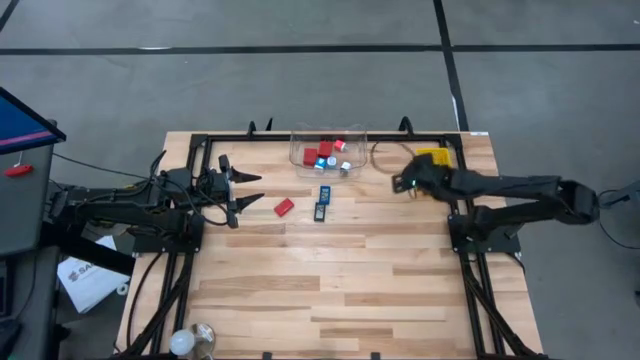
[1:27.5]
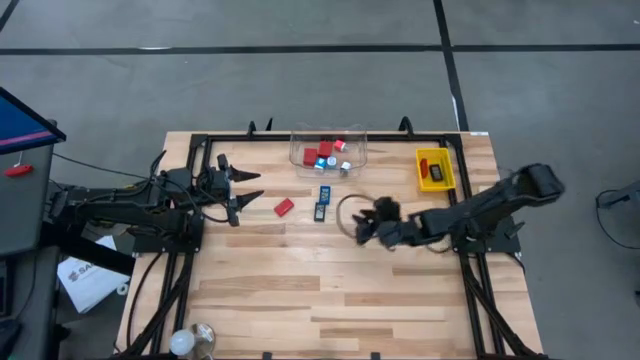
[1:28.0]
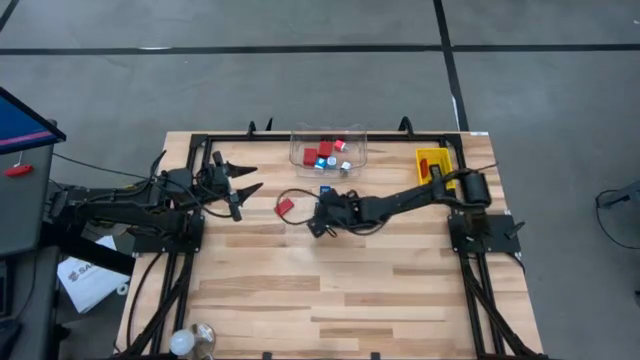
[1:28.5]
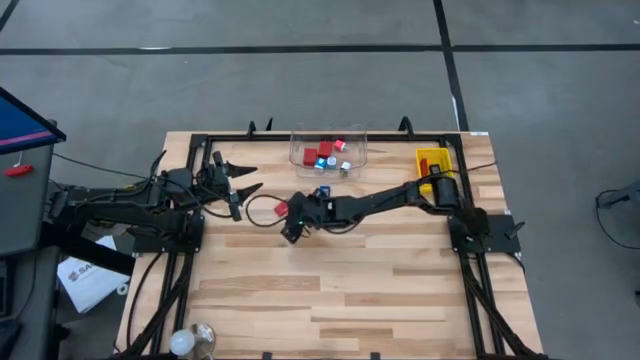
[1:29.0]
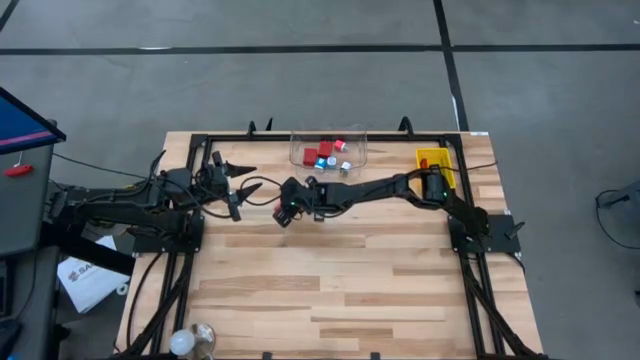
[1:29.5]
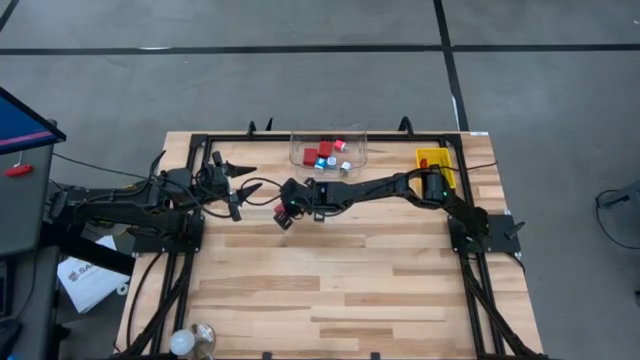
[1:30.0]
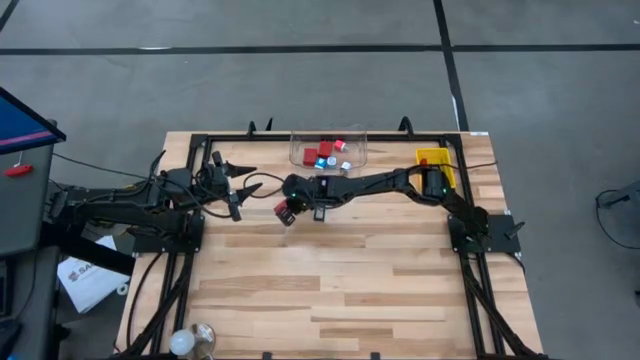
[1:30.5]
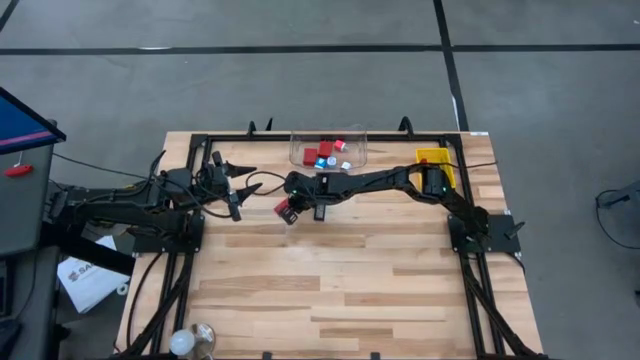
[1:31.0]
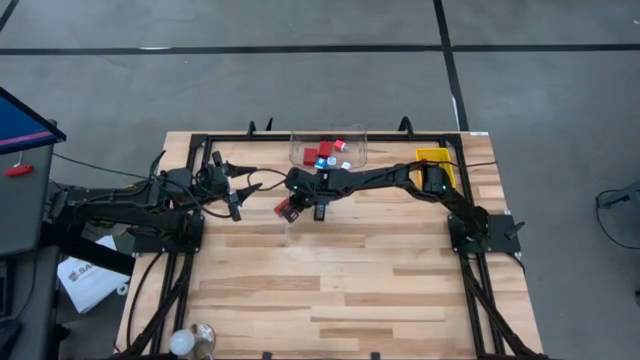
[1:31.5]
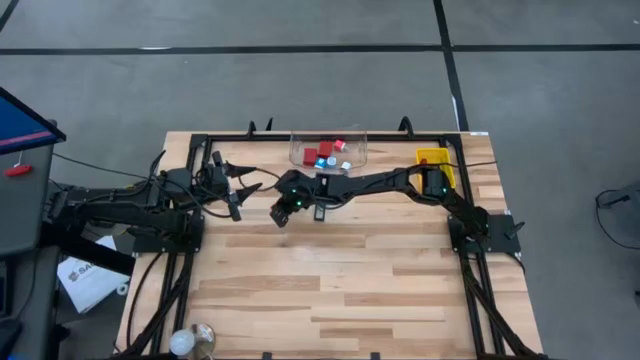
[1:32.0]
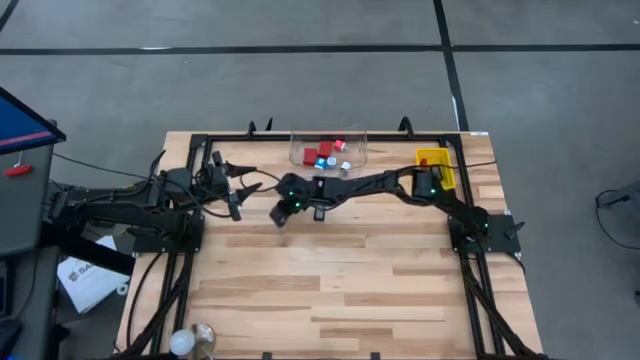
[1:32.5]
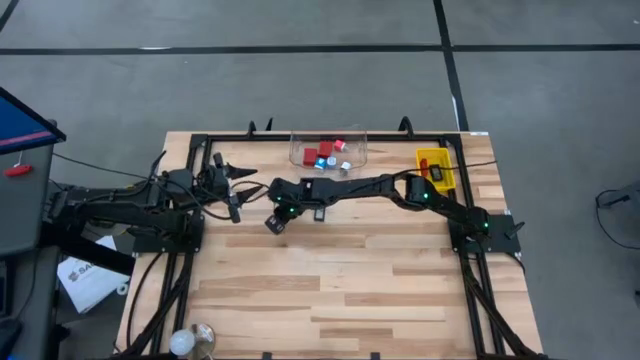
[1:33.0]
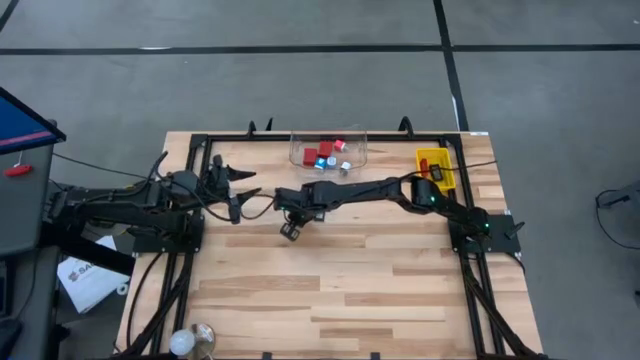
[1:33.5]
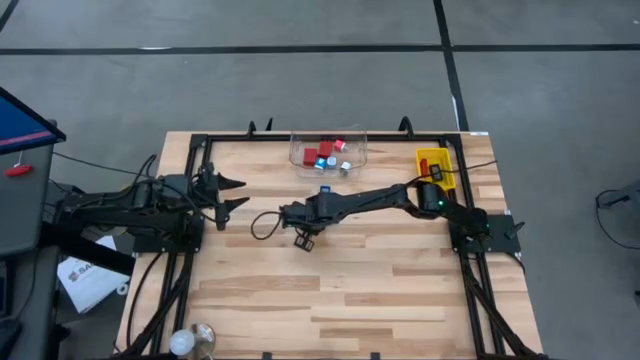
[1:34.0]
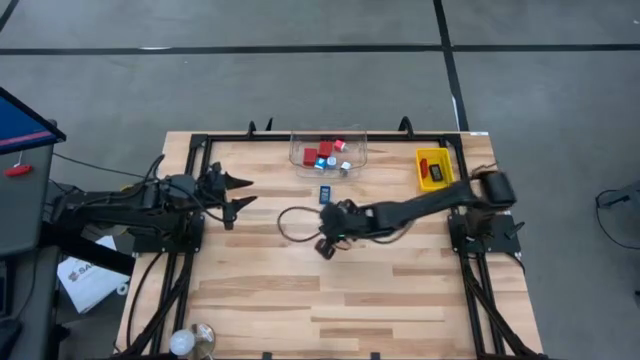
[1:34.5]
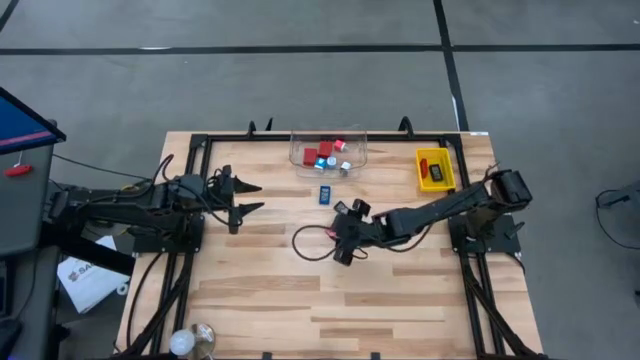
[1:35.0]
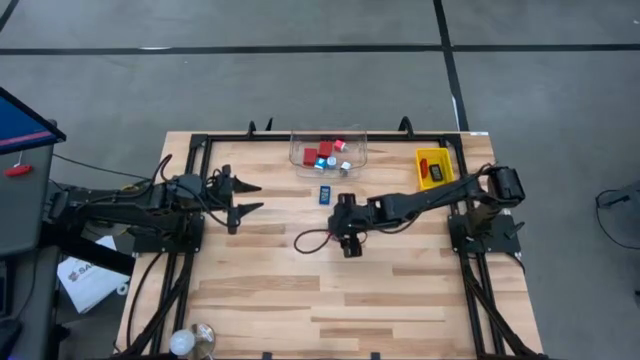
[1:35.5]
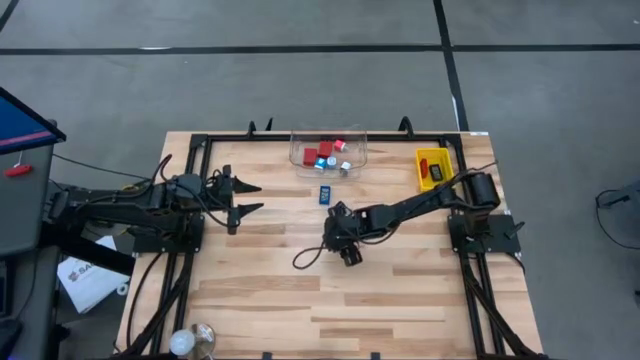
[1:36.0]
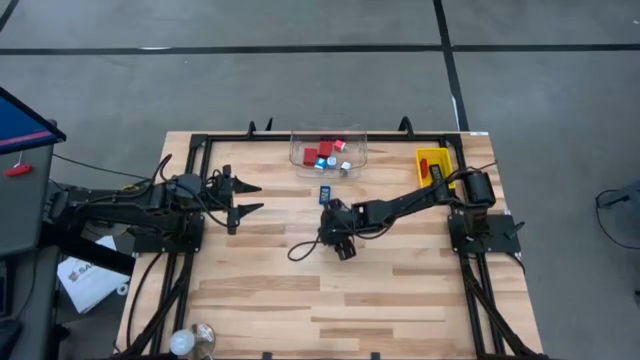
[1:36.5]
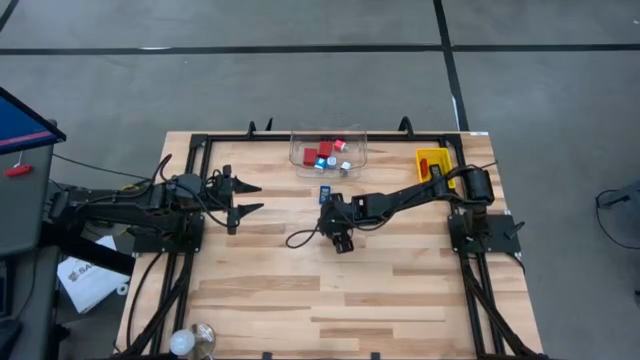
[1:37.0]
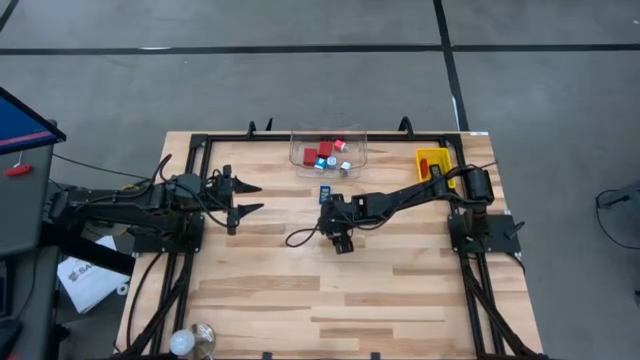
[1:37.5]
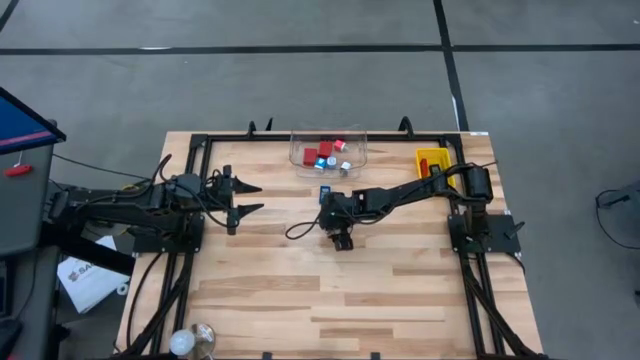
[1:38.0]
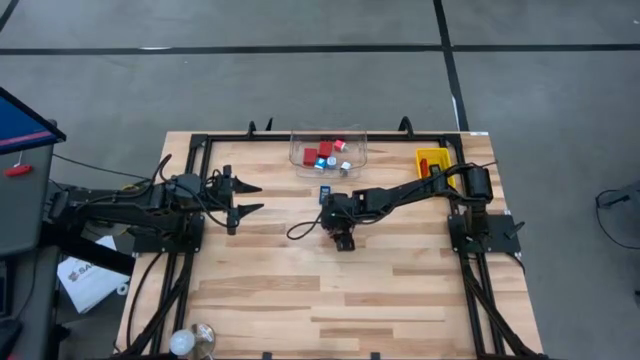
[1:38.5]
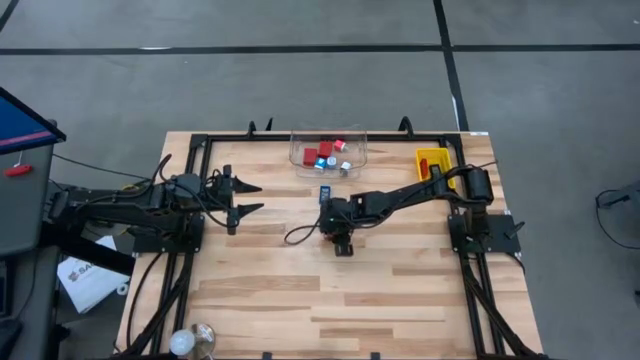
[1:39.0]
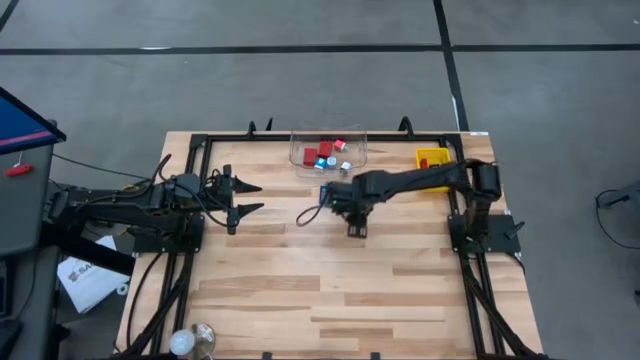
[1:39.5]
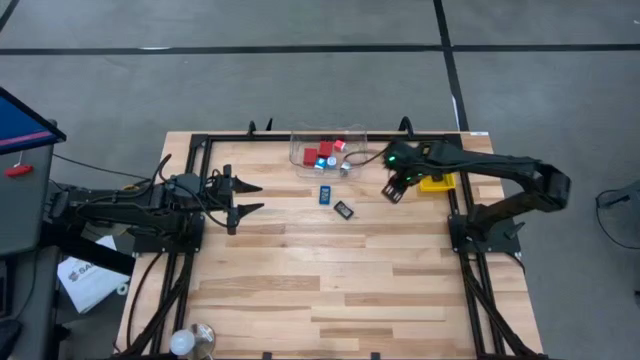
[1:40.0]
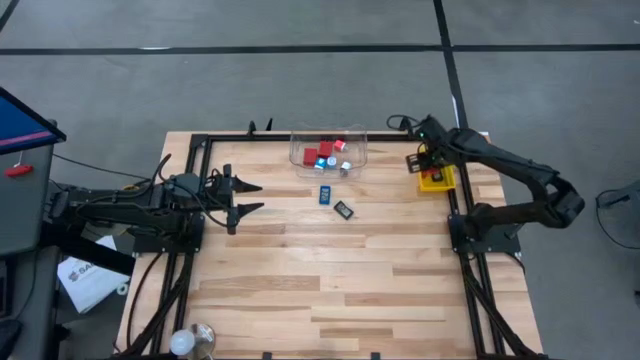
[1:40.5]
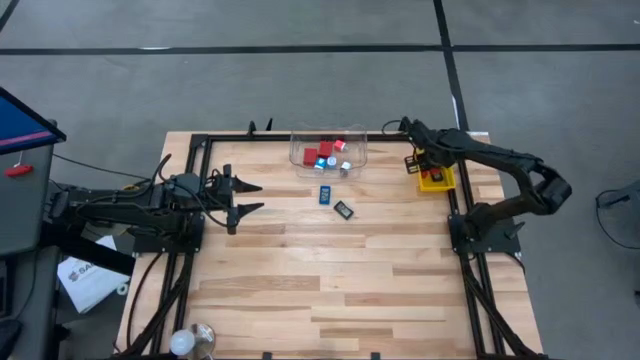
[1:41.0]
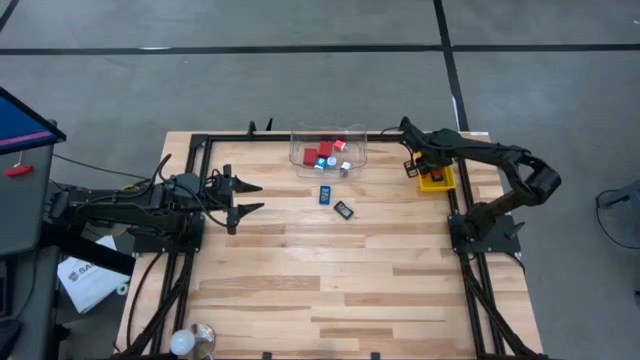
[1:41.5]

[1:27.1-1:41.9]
Task: Pick & Place Office items
Put the red digital clock into the yellow bin

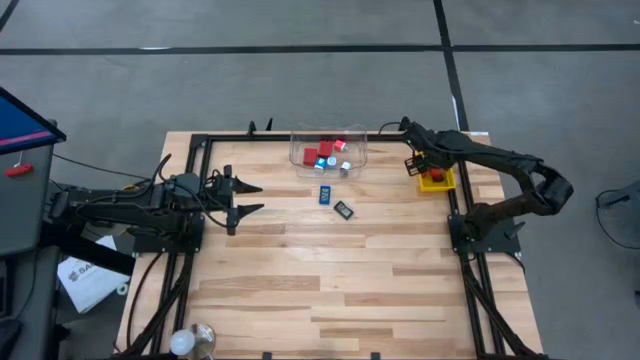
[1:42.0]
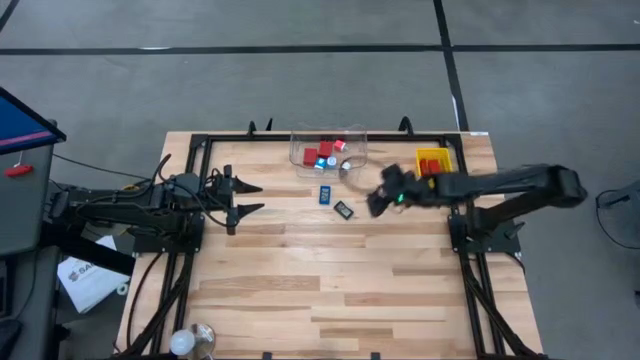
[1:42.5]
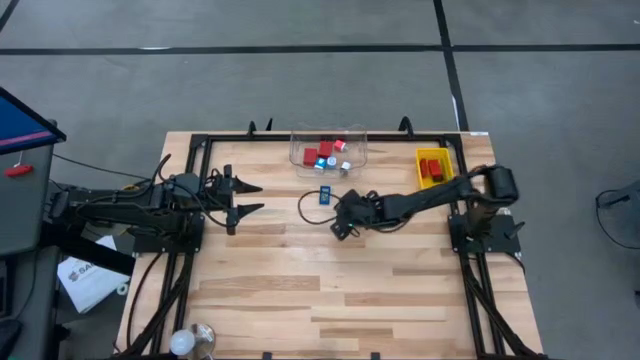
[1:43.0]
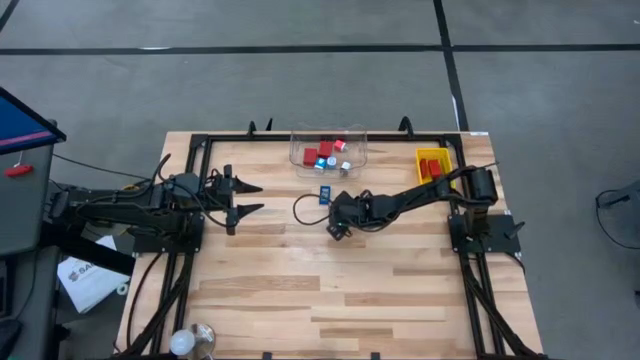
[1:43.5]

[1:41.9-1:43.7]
Put the black digital clock into the yellow bin

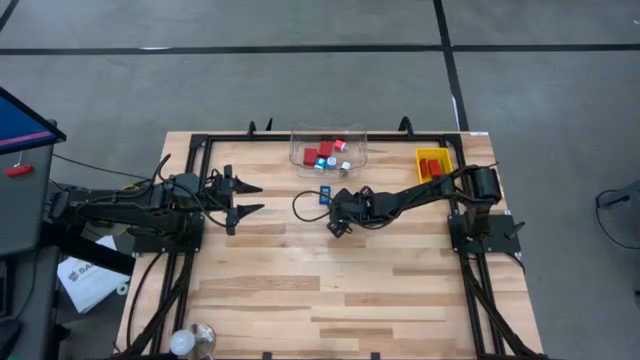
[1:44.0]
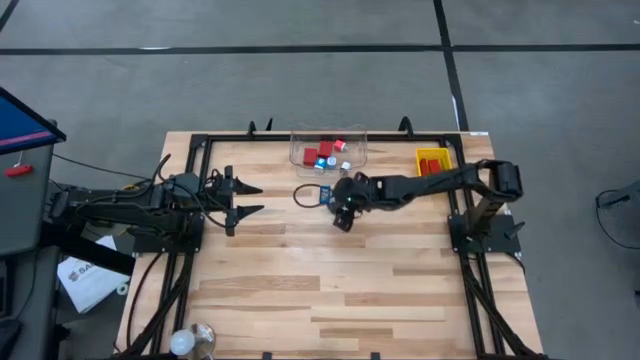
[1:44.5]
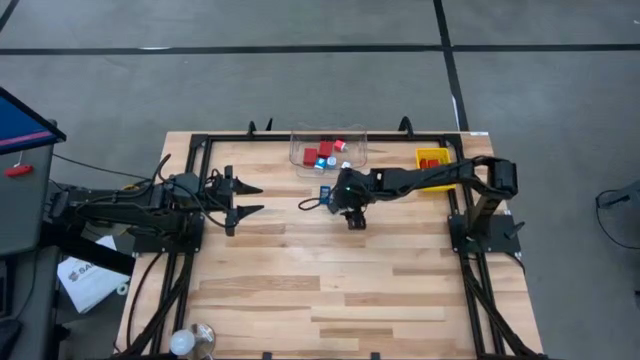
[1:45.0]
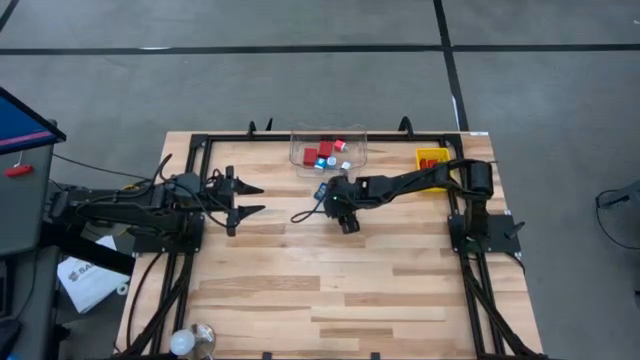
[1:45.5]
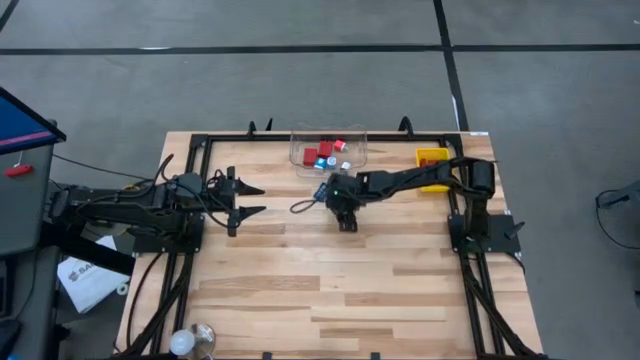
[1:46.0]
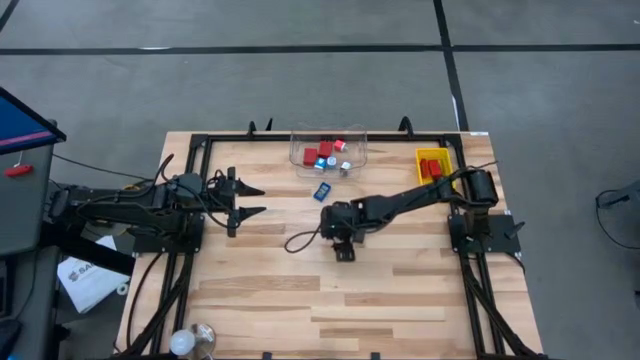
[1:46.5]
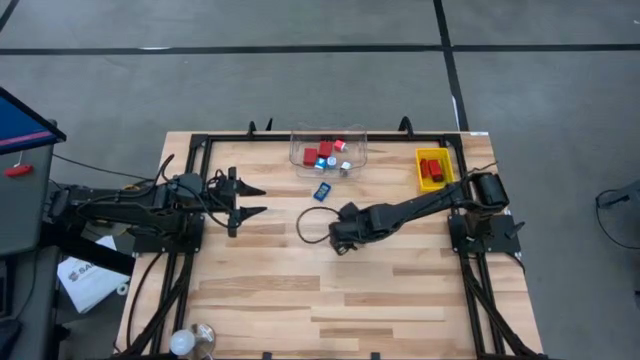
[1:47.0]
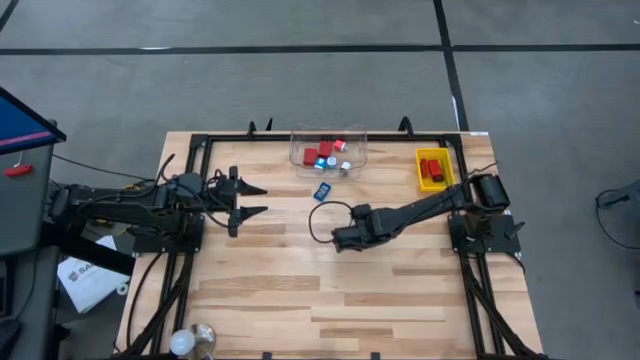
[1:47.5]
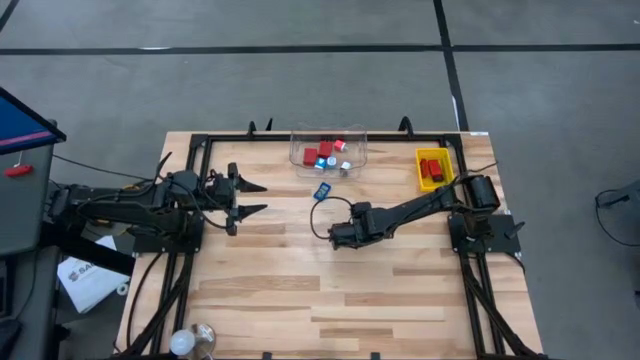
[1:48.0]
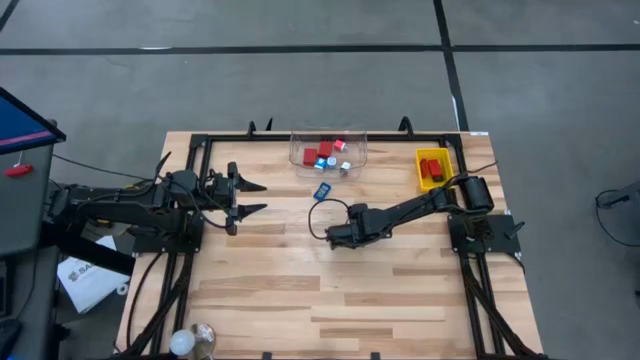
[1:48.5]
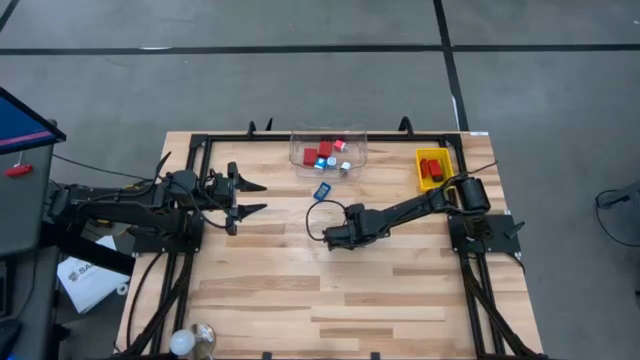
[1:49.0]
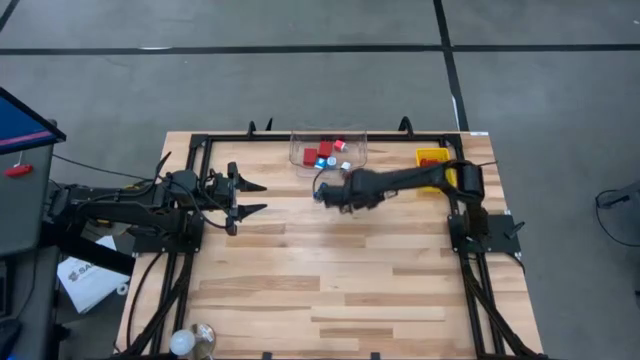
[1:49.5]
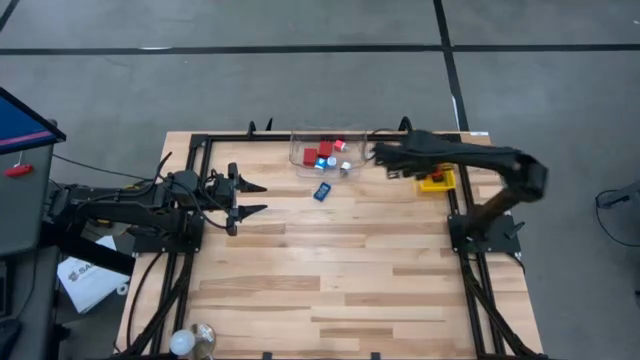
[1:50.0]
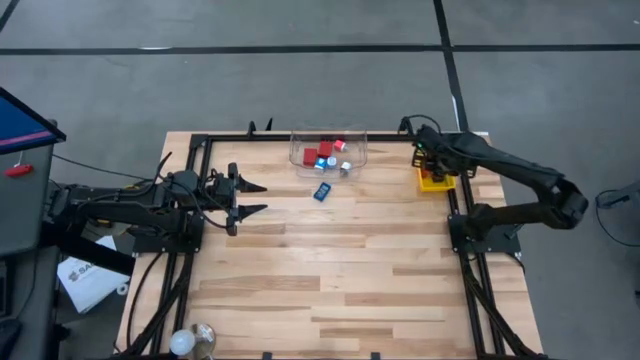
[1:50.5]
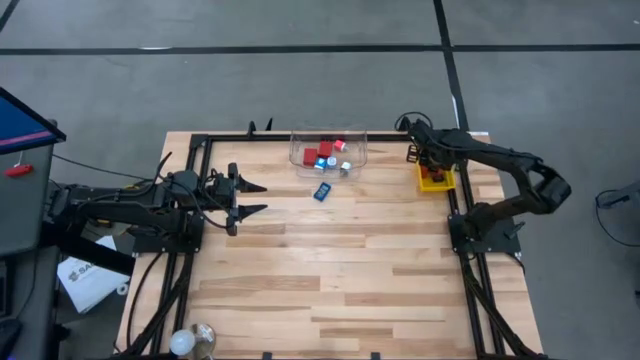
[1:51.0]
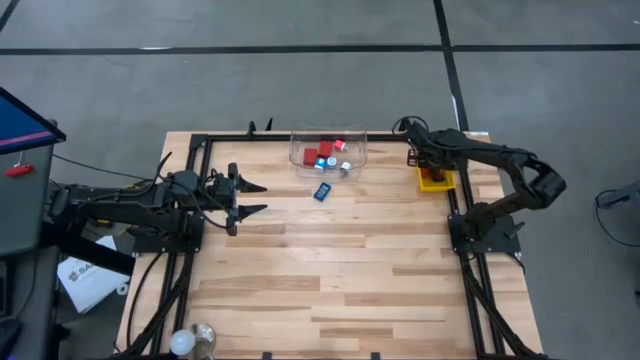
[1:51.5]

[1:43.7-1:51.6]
Put the black digital clock into the yellow bin
